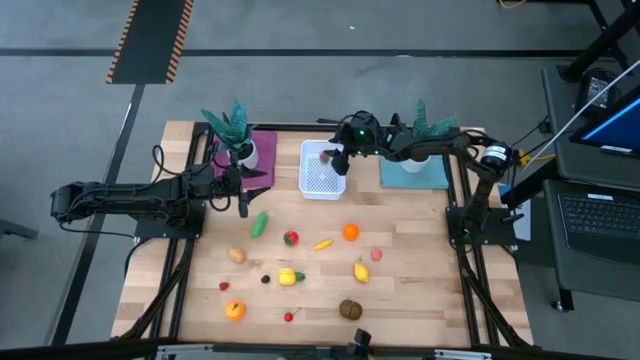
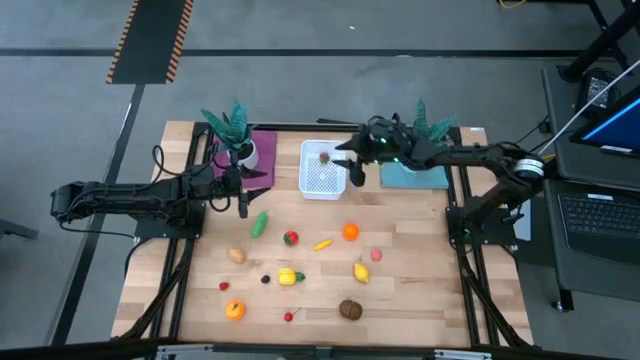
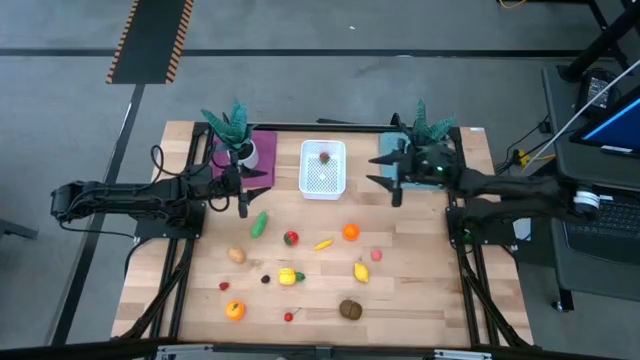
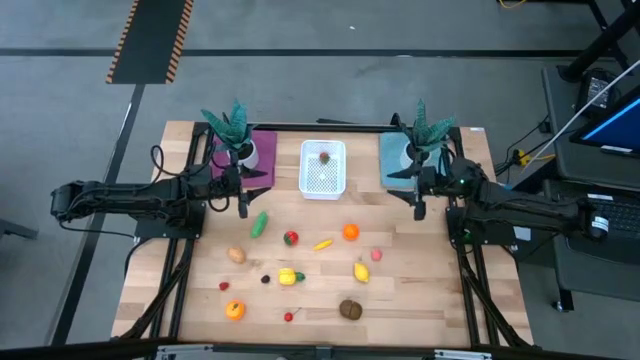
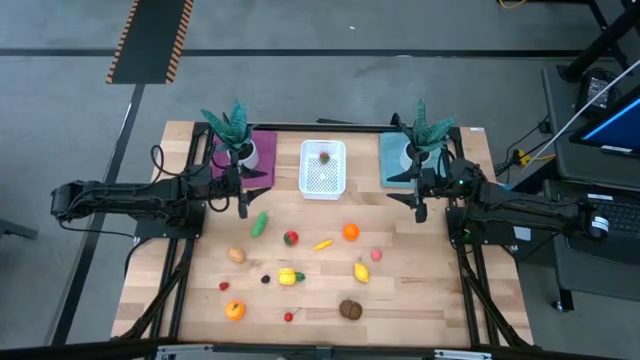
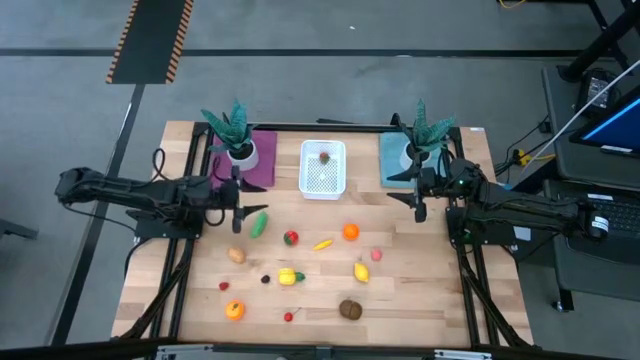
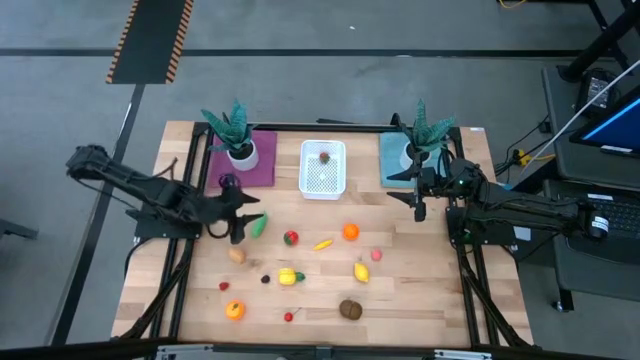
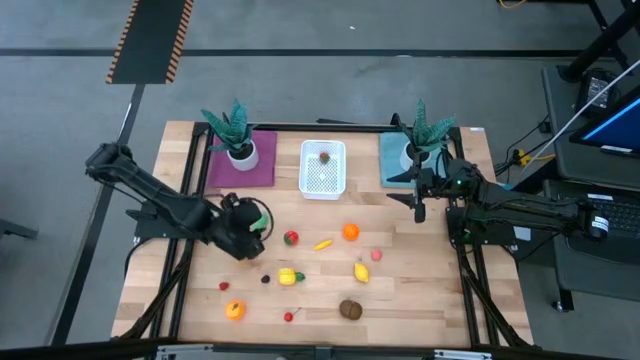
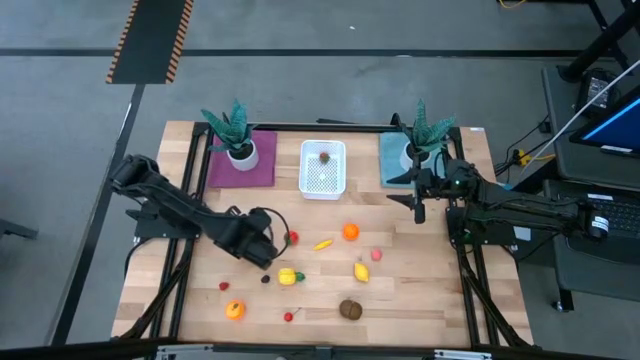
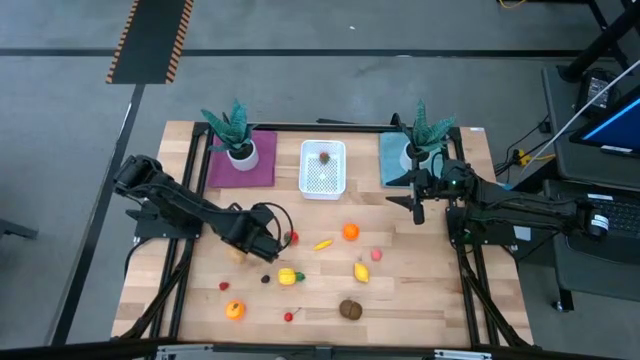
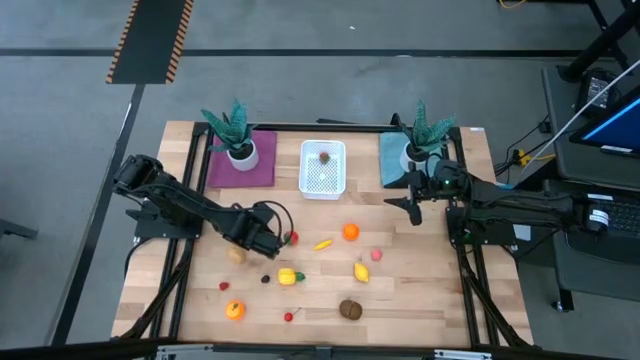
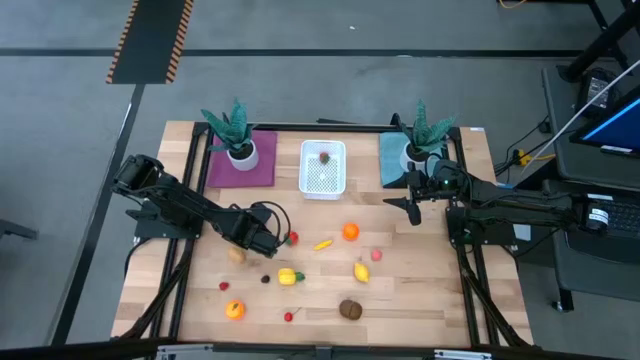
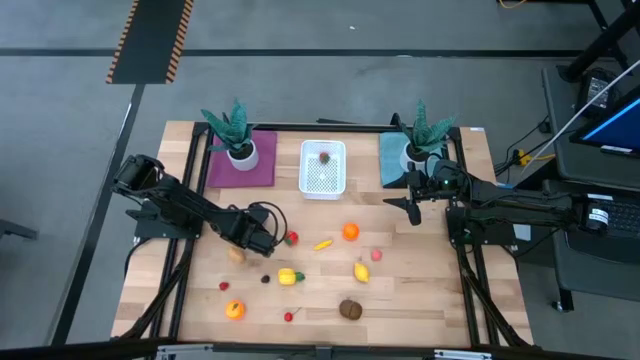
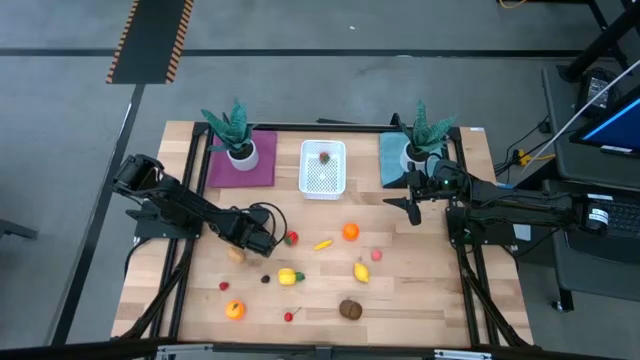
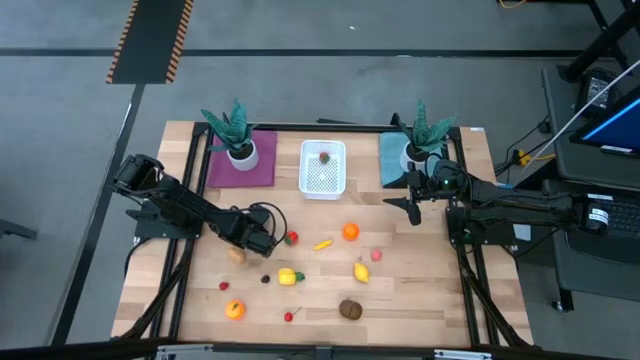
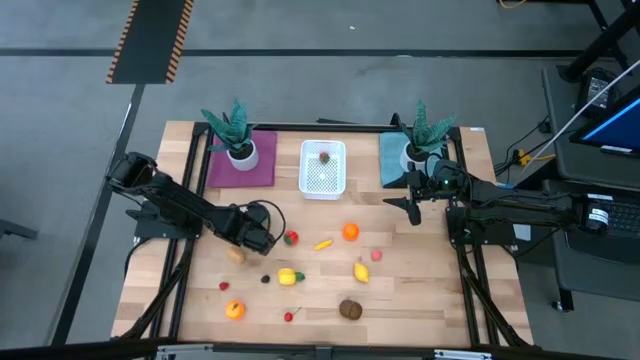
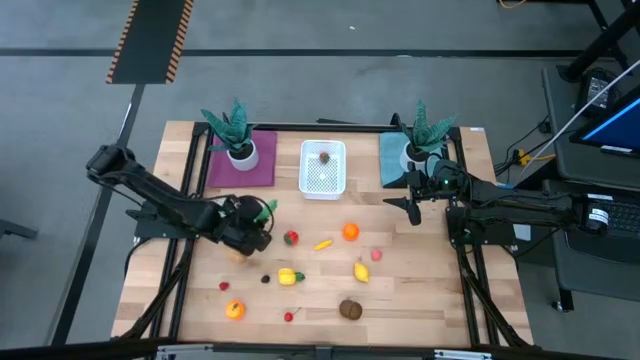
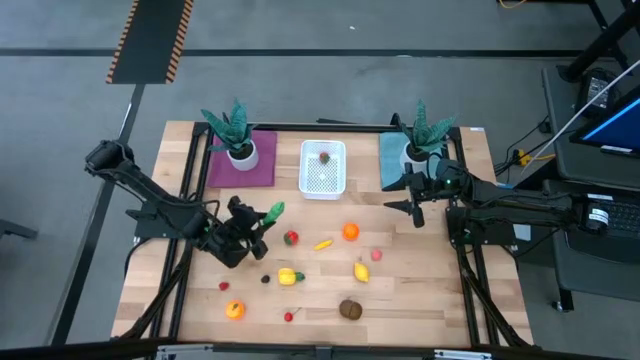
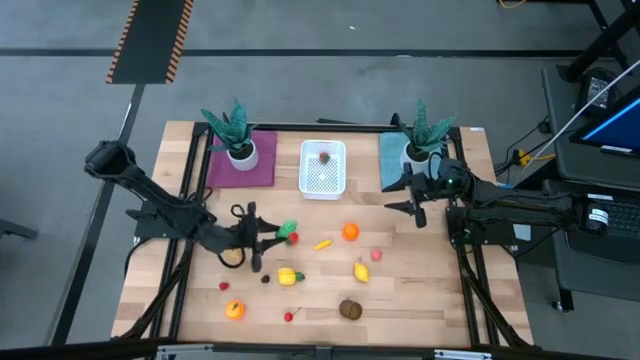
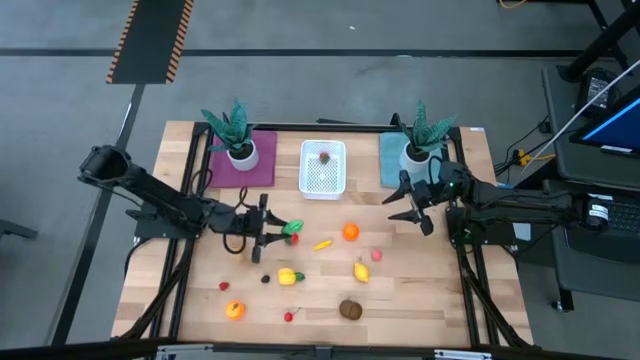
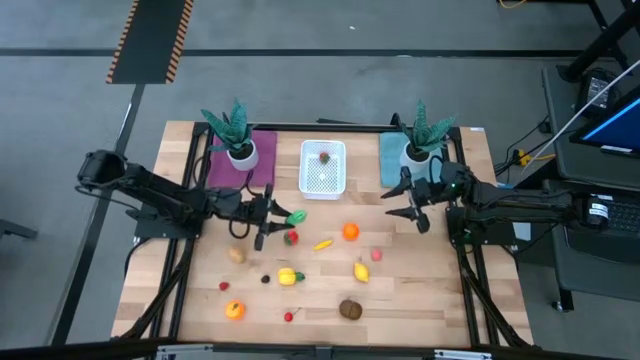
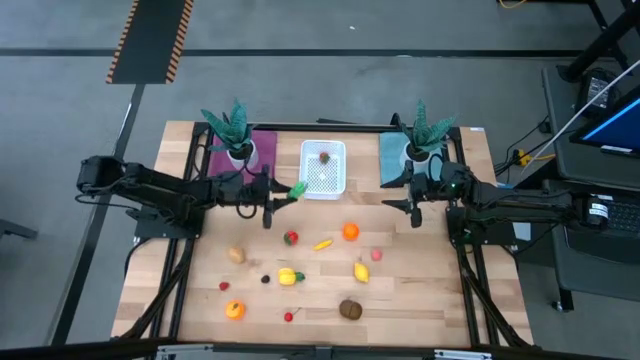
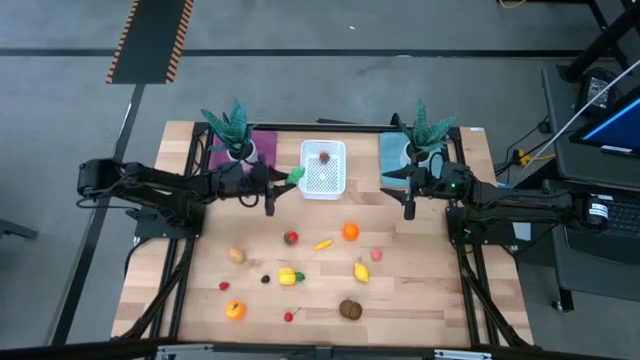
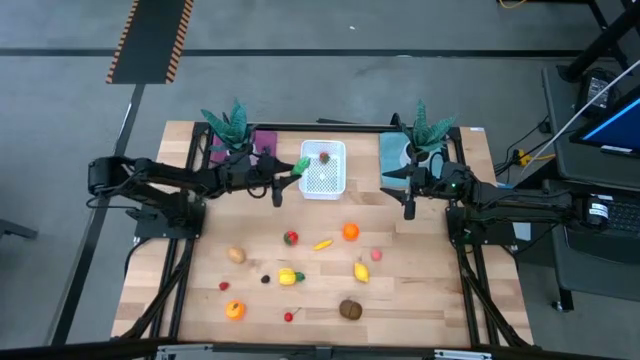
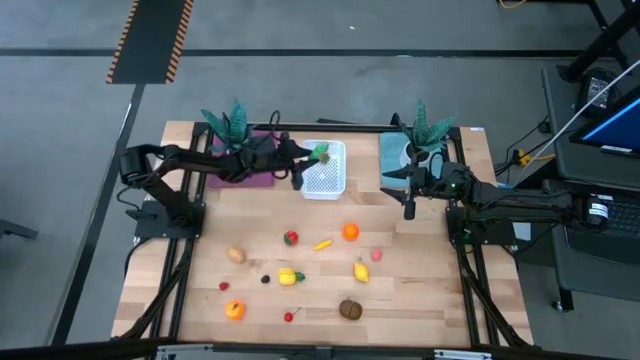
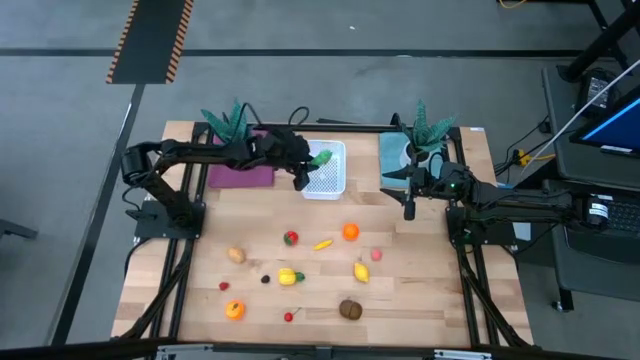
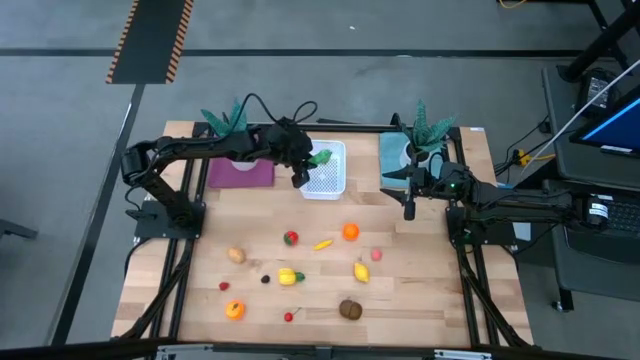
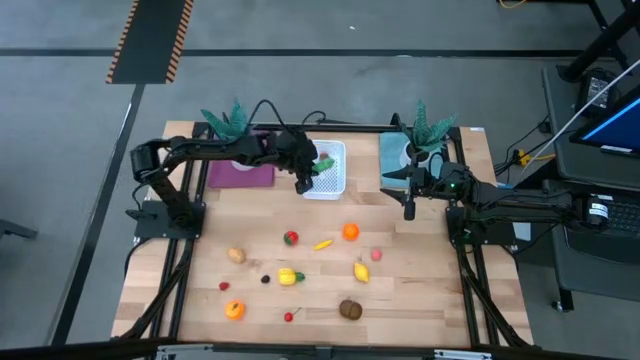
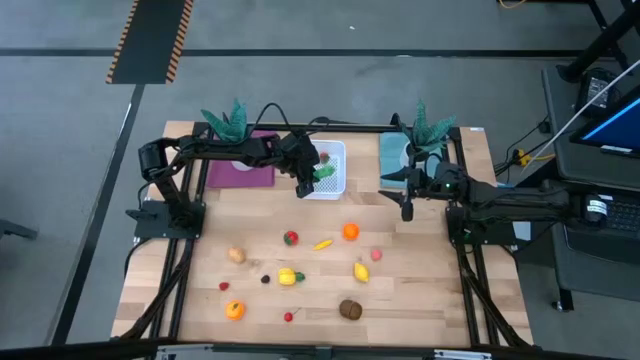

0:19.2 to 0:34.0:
Task: Pick and placing Produce into tupperware
Put the green eggplant into the white bin

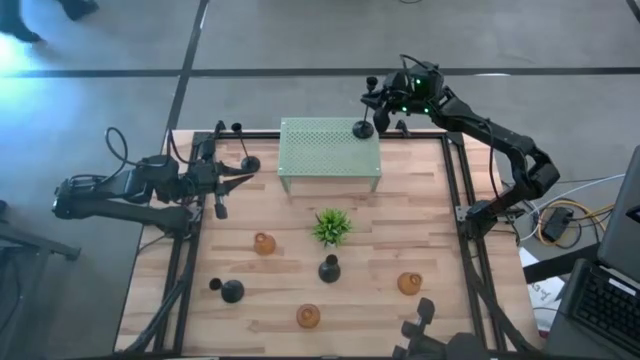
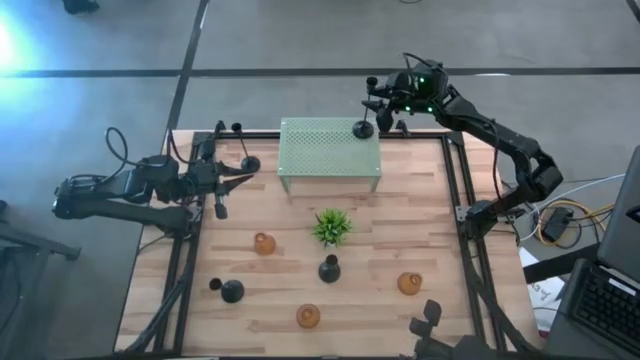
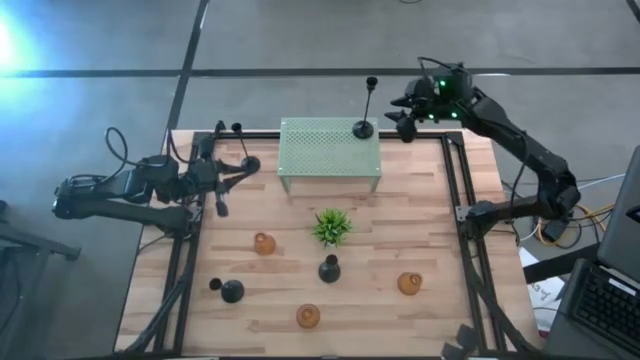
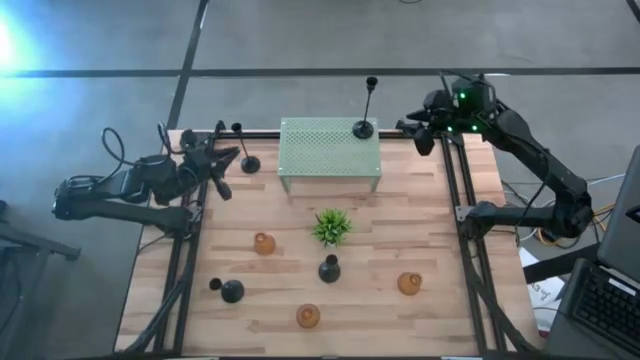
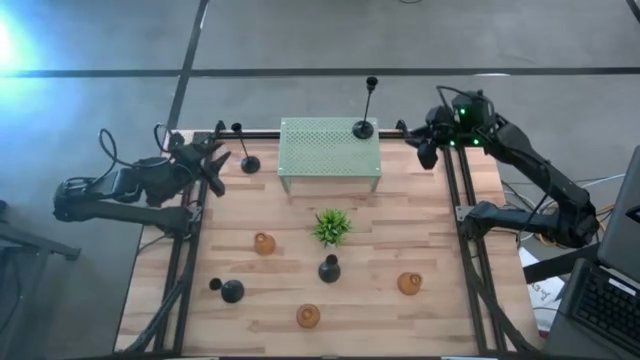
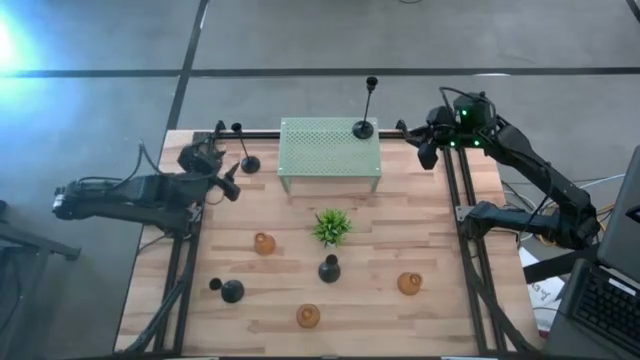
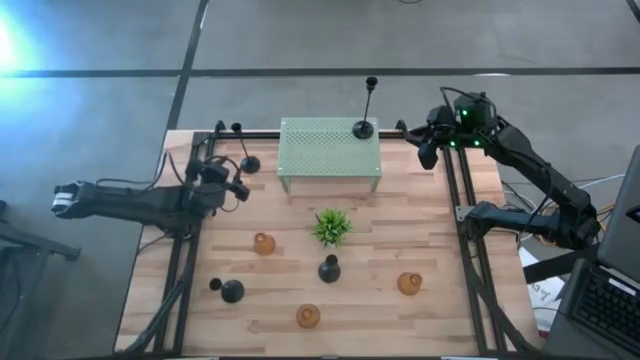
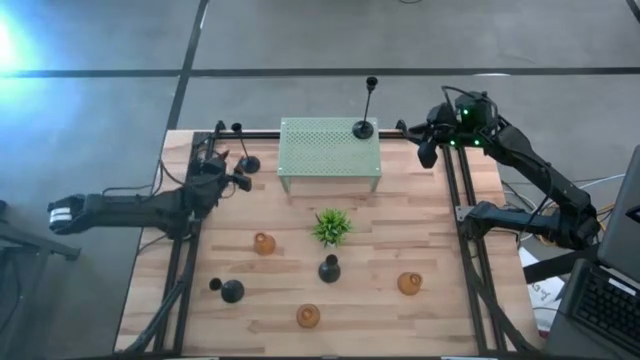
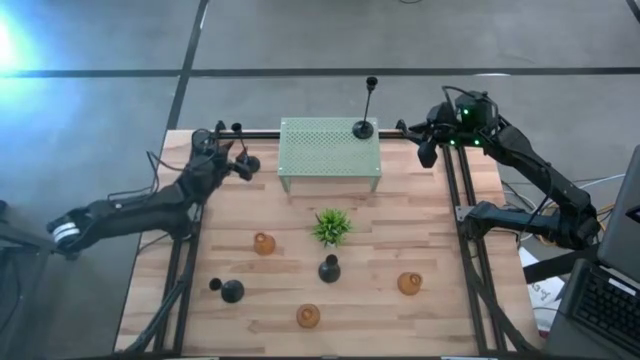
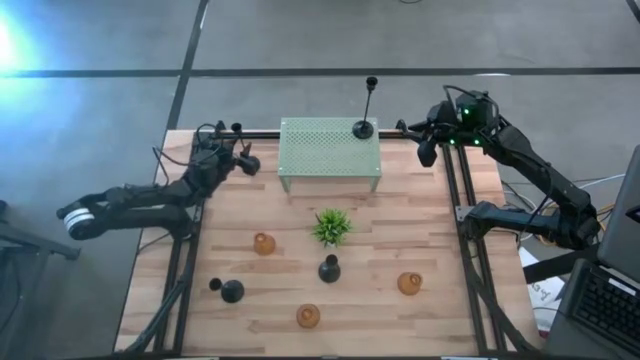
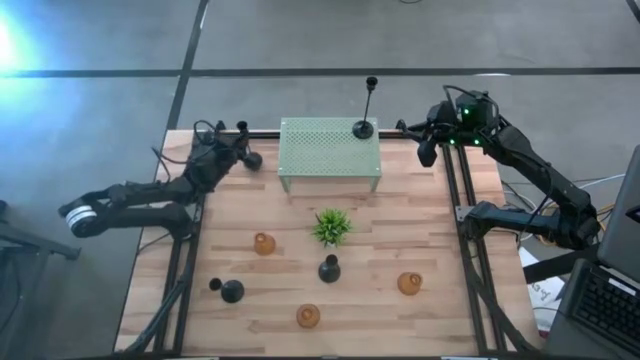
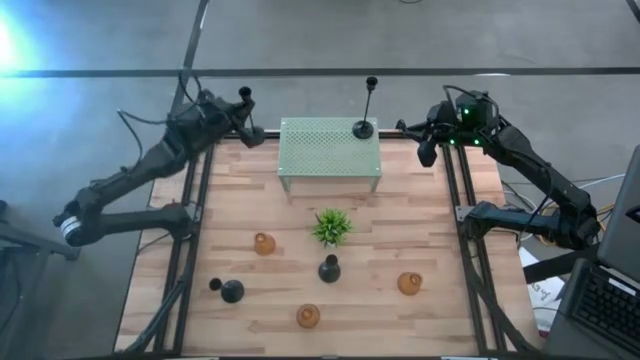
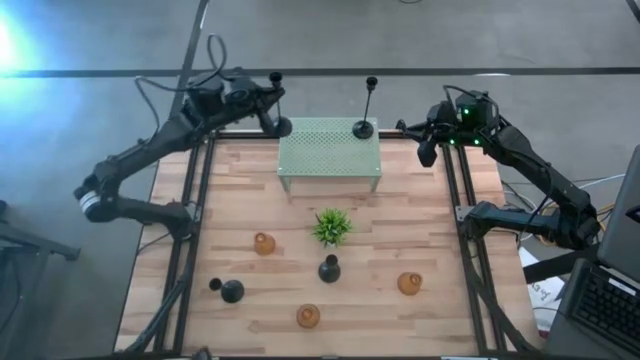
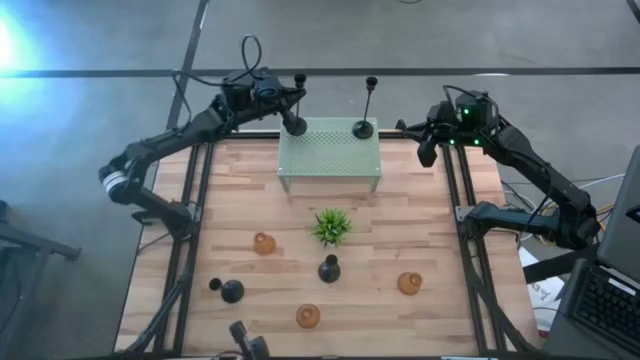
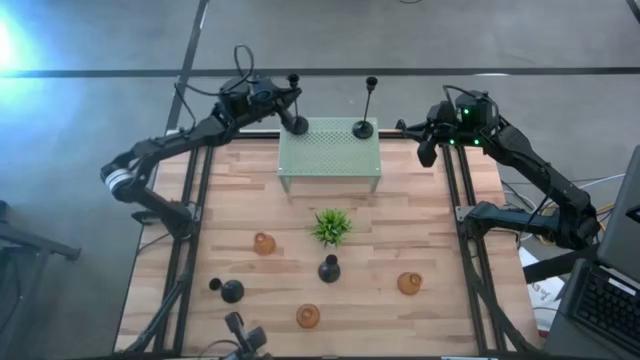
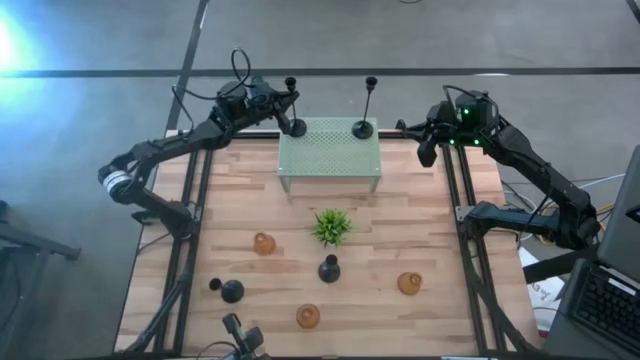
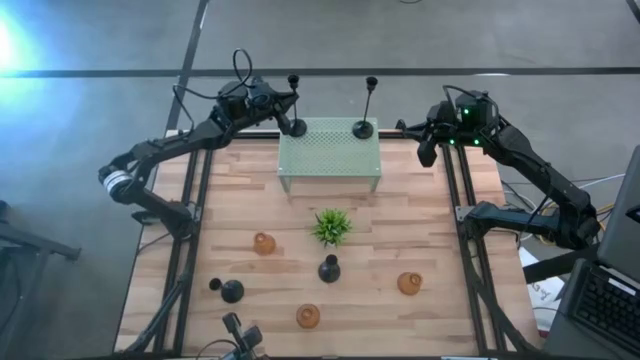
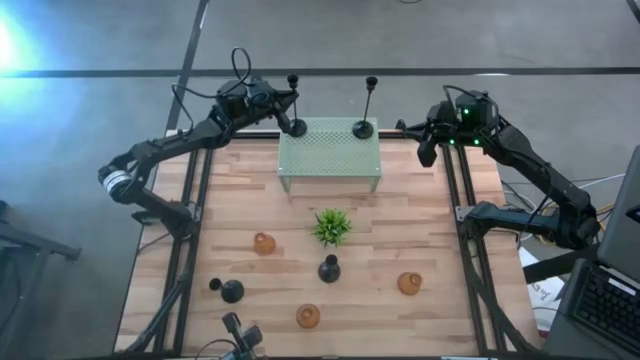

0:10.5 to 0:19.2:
Task: Pick & Place candle stick holders
Put the black candle holder on the shelf
